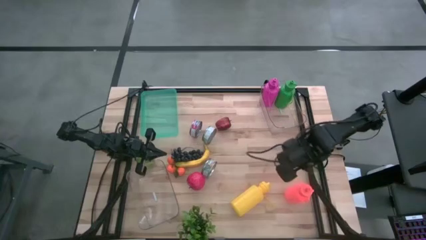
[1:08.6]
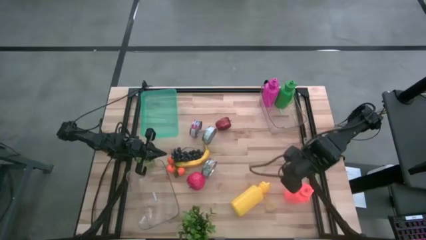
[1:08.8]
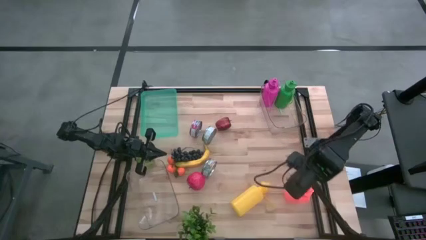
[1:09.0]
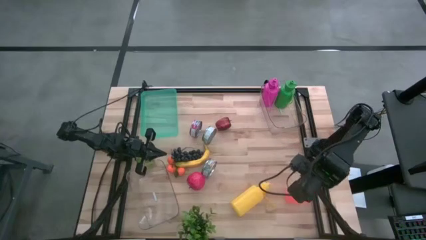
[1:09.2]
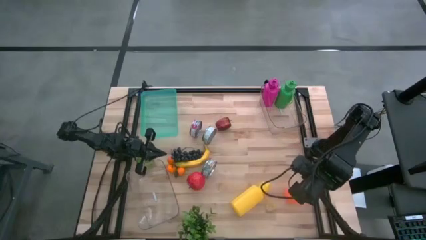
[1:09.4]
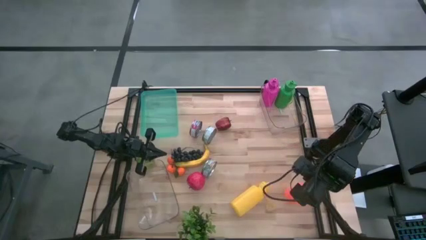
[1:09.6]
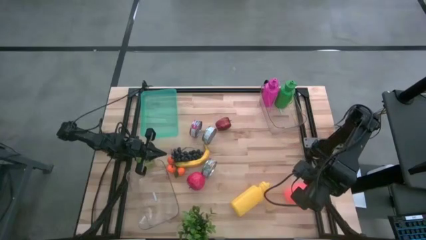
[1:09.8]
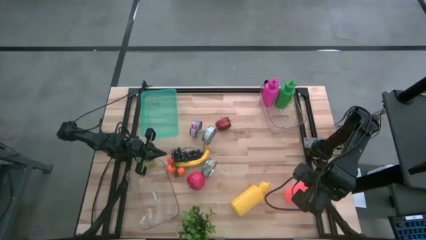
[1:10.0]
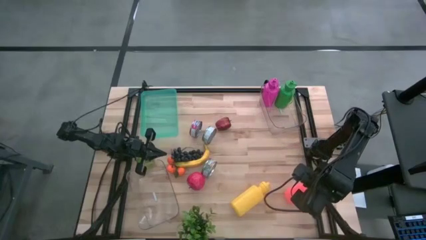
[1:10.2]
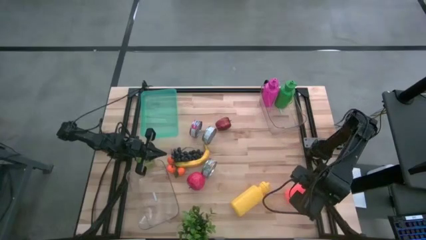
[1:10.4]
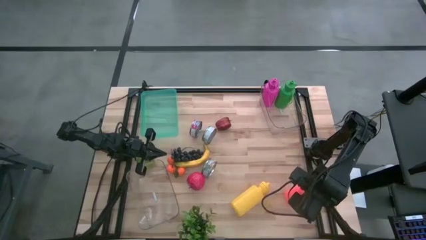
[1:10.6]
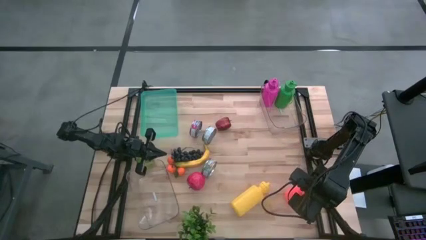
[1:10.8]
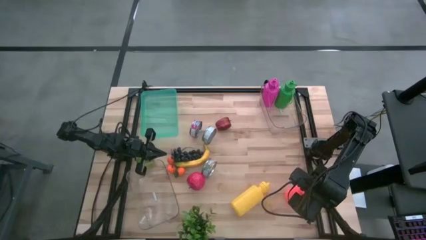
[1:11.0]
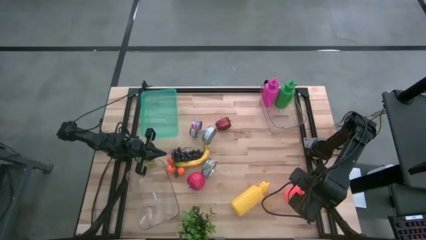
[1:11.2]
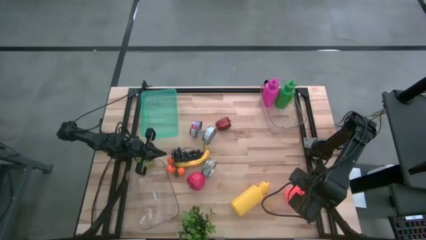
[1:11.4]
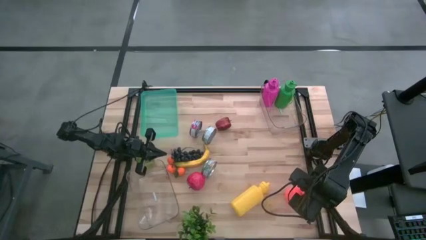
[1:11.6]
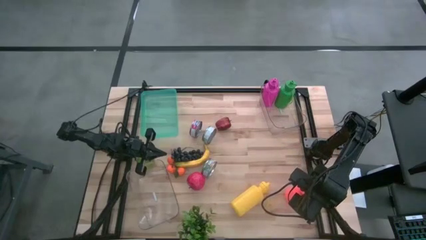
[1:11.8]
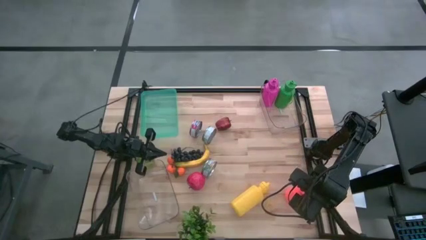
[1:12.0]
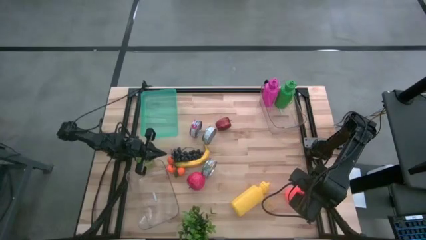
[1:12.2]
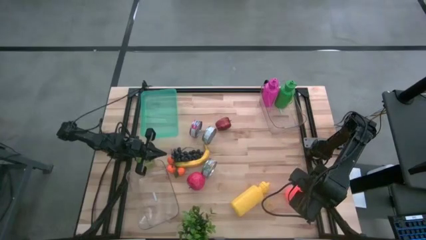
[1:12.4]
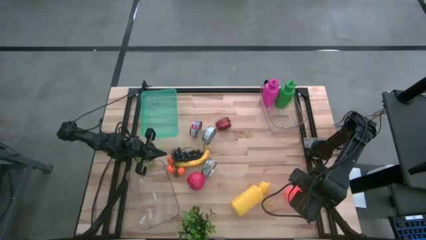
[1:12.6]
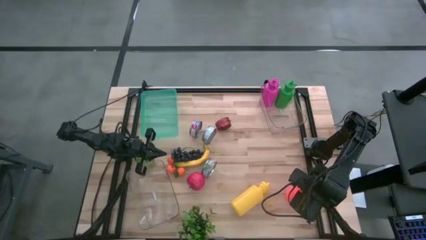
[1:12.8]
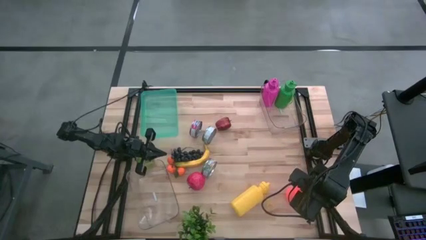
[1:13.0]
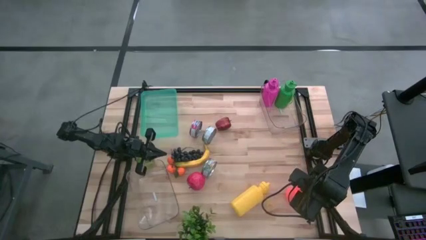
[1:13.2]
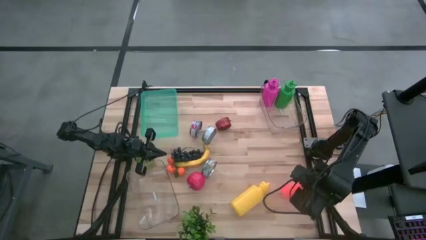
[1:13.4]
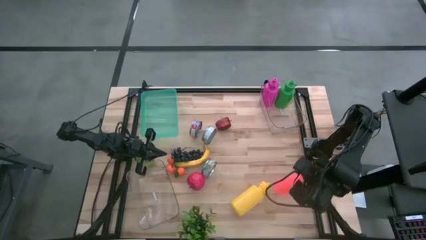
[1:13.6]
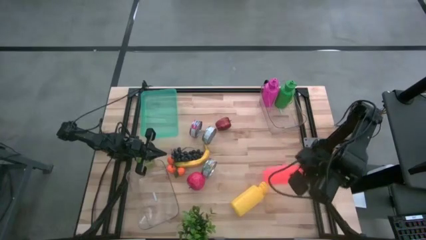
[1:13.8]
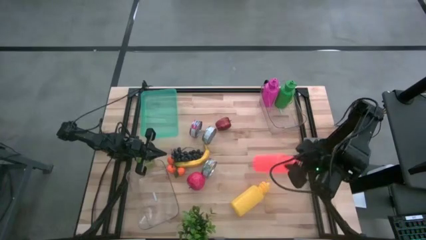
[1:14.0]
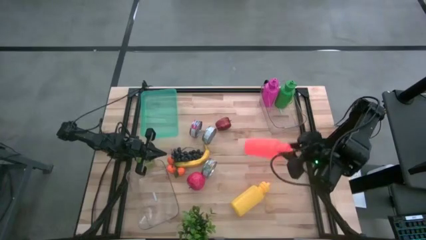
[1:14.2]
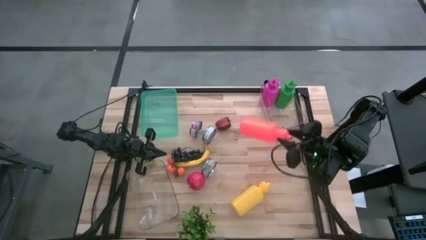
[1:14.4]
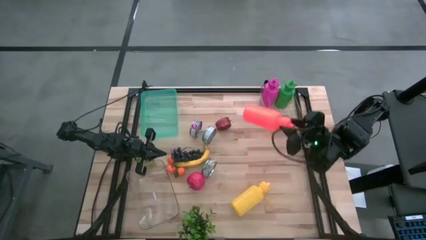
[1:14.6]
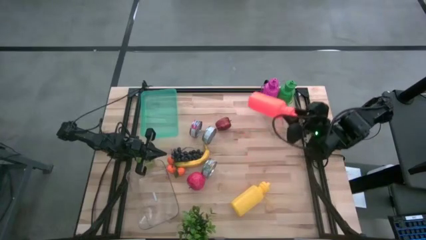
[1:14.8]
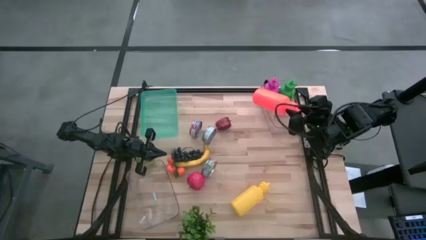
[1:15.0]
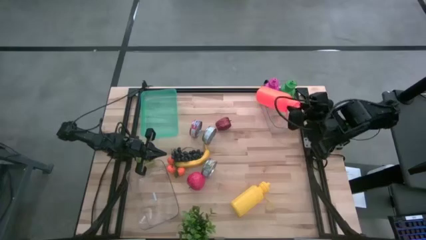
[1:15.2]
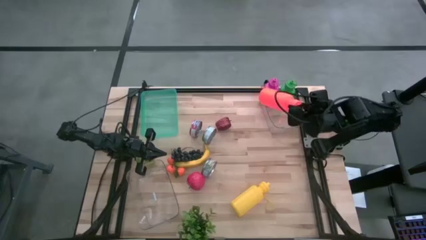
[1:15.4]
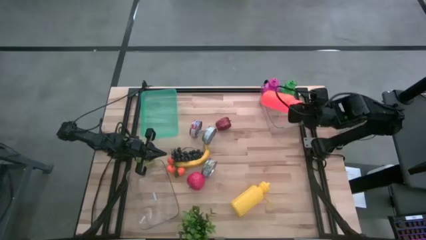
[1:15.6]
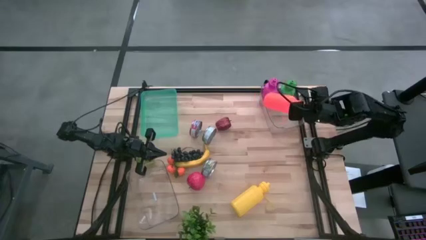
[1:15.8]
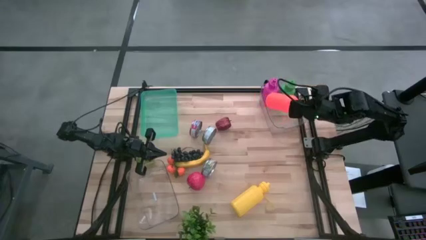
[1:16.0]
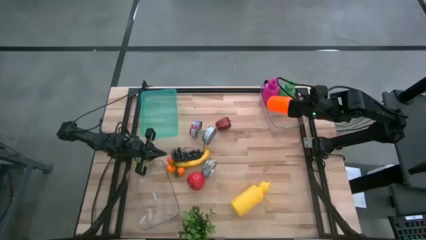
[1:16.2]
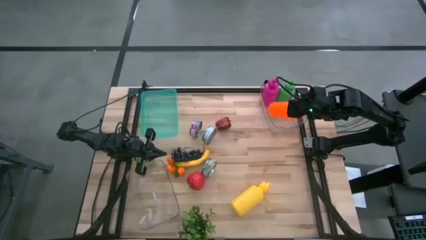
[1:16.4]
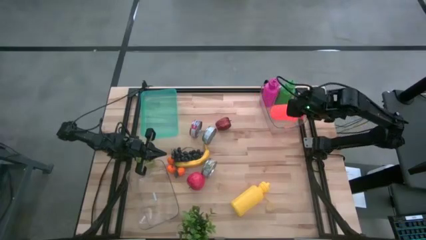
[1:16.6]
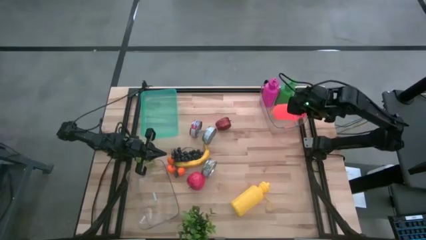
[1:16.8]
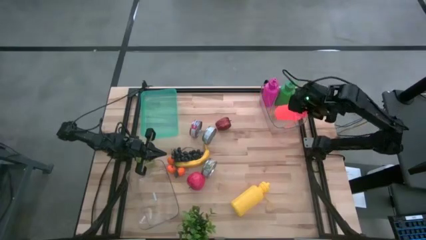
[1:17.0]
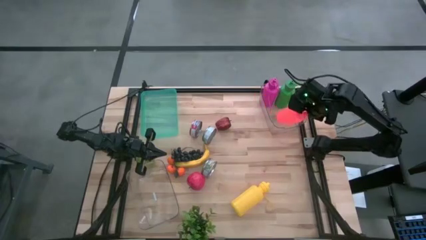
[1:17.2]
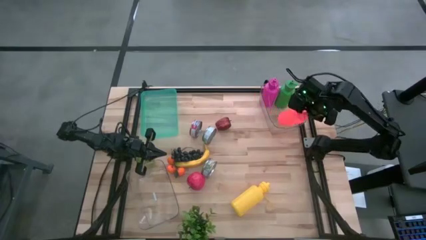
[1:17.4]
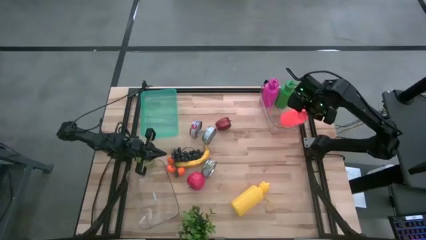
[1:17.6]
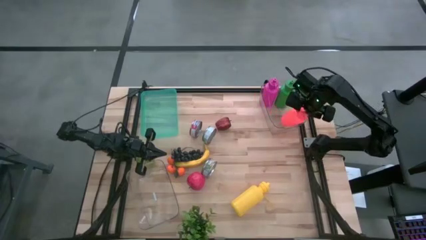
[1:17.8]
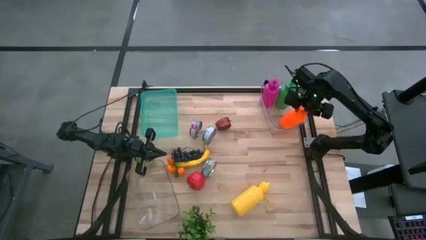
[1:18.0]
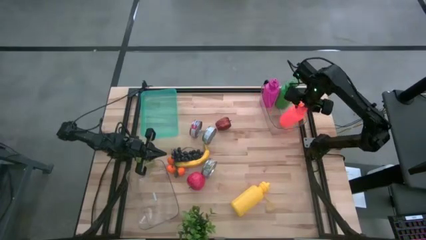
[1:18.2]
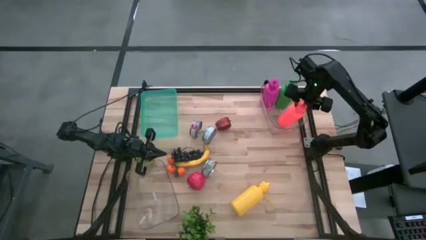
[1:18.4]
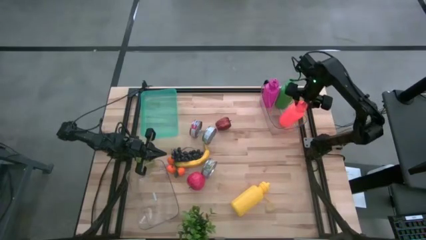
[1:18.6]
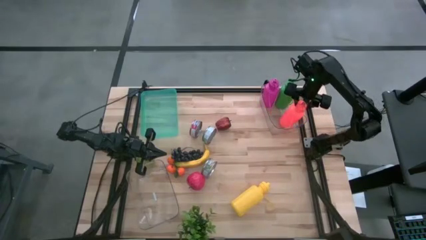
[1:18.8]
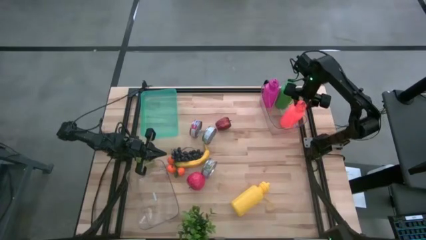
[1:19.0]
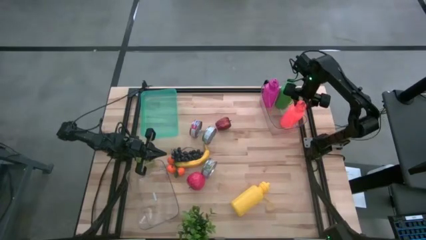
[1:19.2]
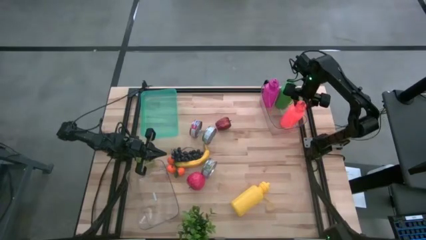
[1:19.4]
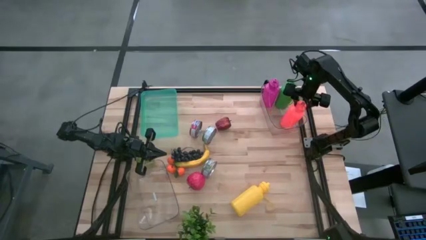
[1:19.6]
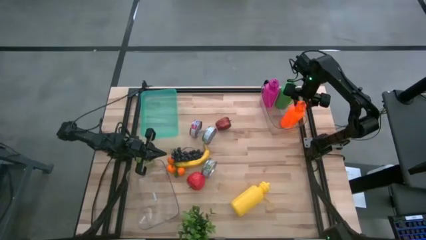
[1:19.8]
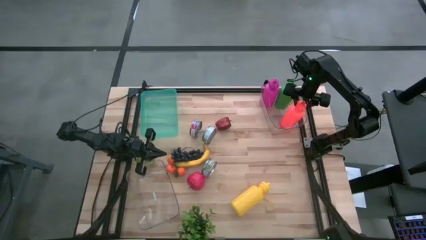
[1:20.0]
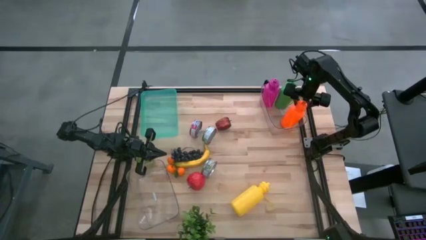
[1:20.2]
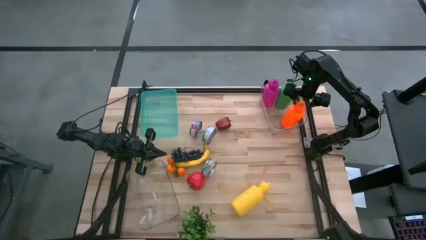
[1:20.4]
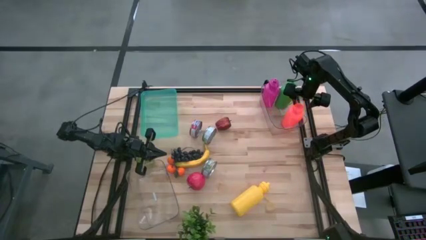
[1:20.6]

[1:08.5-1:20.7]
Task: Pick & Place Food Item
Put the orange tumbler bottle into the top right transparent bin
